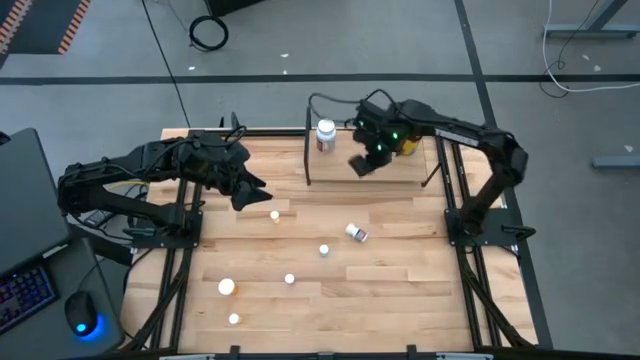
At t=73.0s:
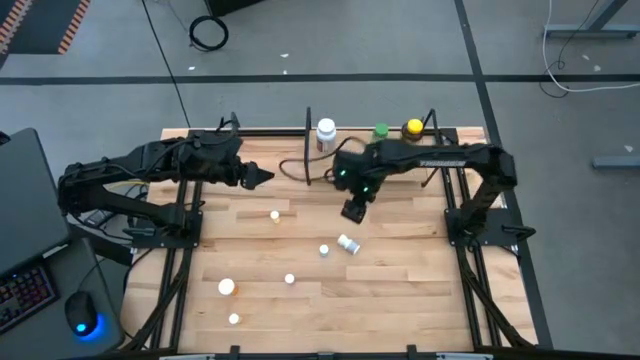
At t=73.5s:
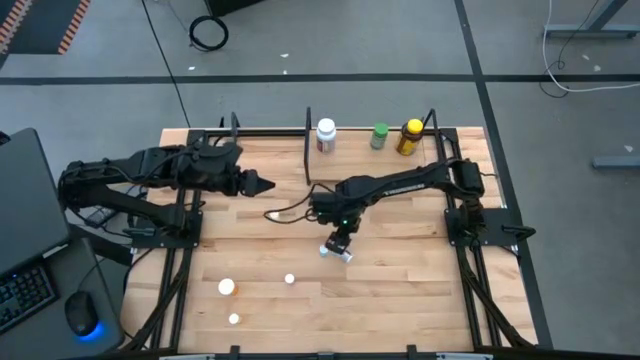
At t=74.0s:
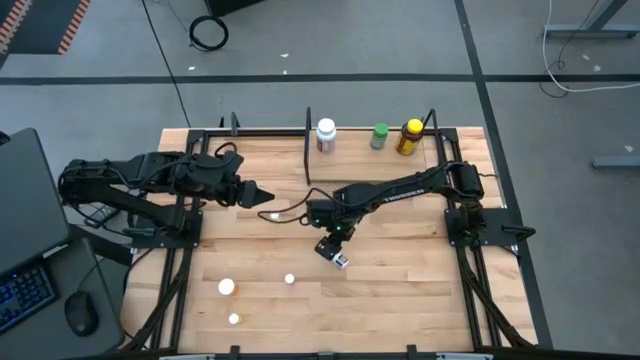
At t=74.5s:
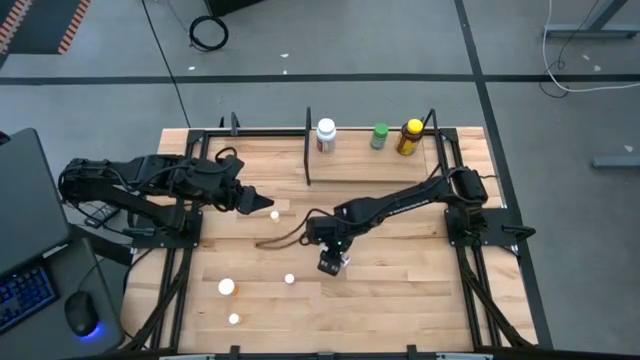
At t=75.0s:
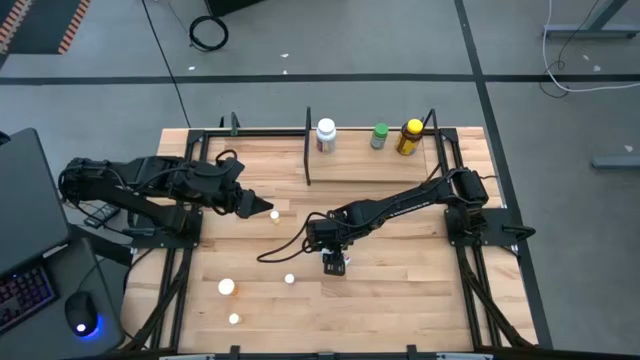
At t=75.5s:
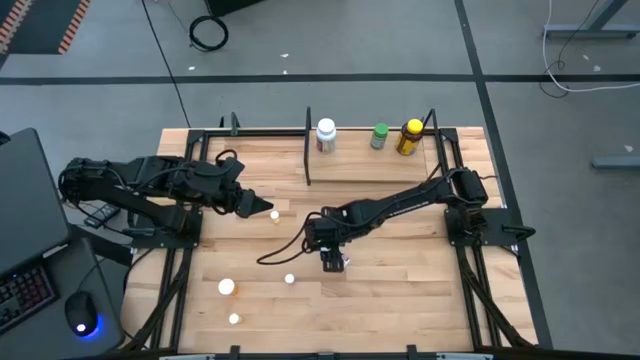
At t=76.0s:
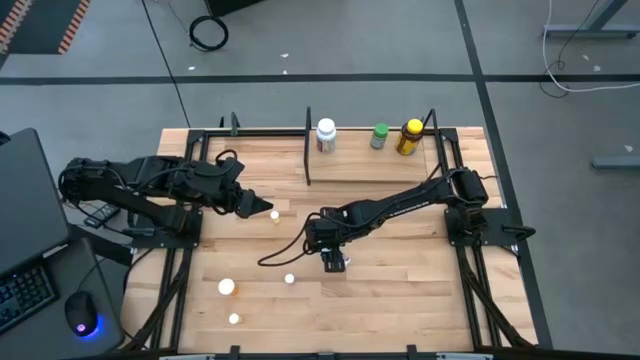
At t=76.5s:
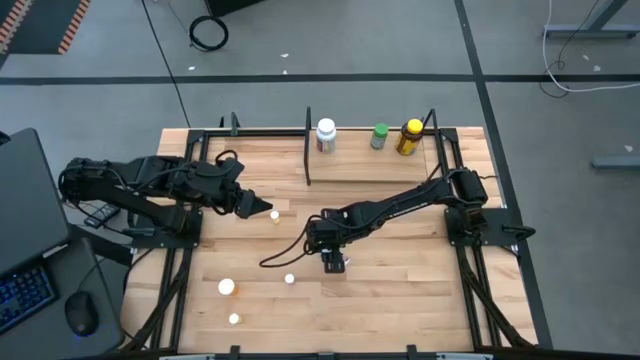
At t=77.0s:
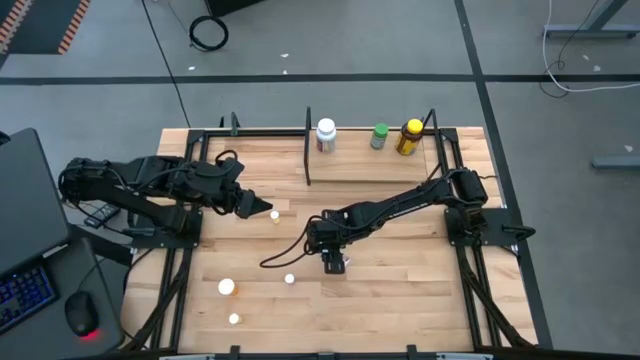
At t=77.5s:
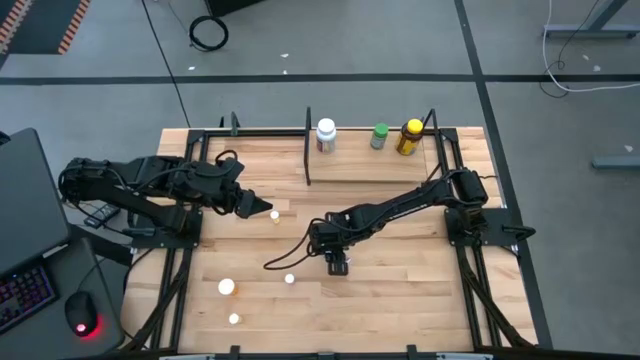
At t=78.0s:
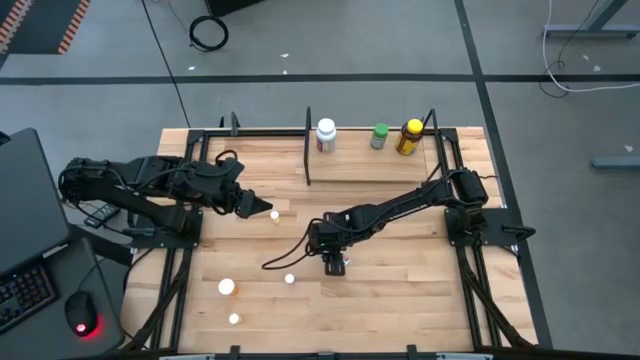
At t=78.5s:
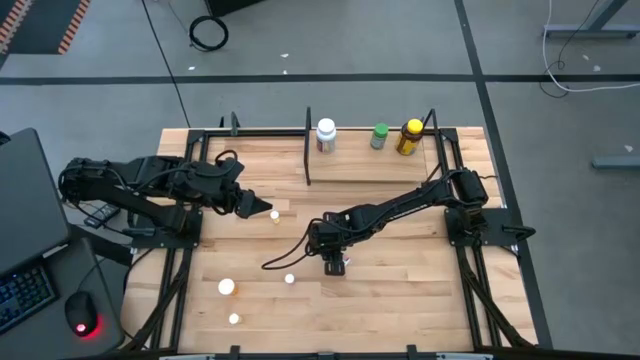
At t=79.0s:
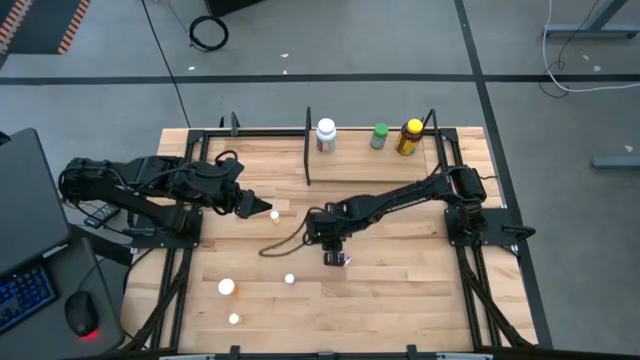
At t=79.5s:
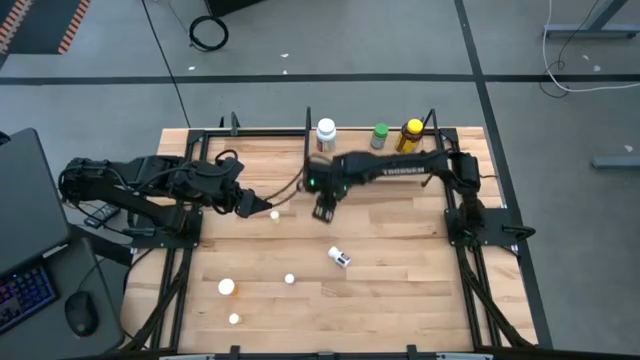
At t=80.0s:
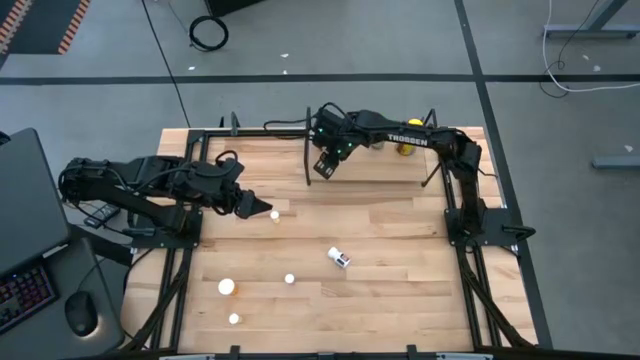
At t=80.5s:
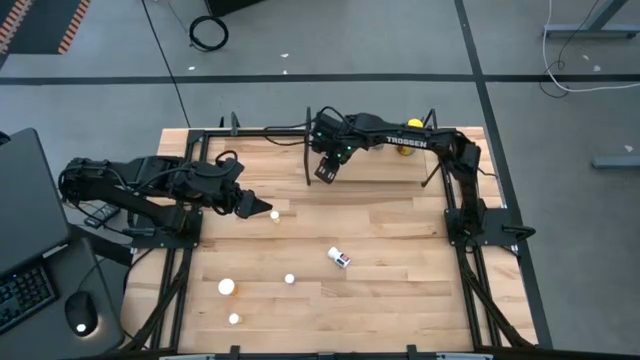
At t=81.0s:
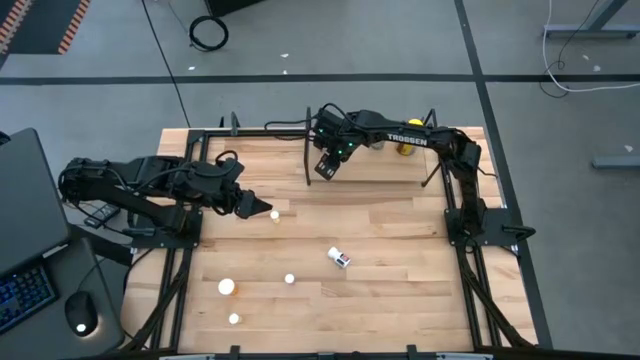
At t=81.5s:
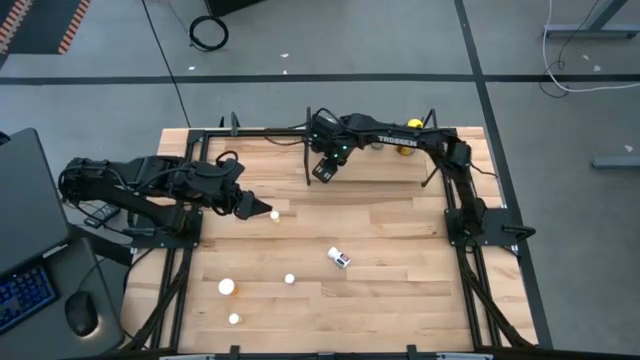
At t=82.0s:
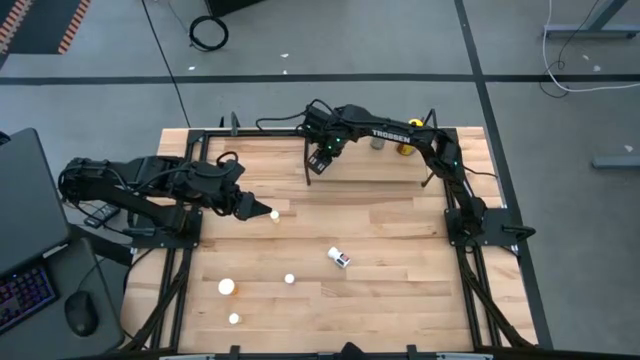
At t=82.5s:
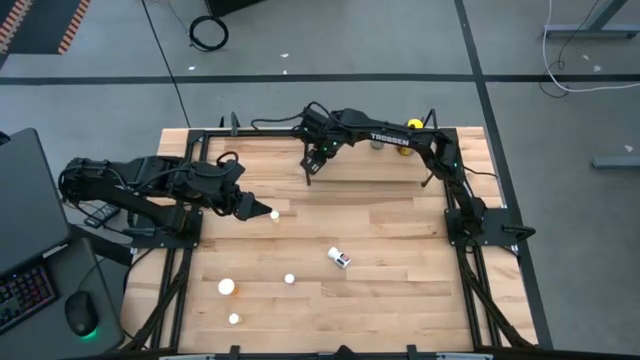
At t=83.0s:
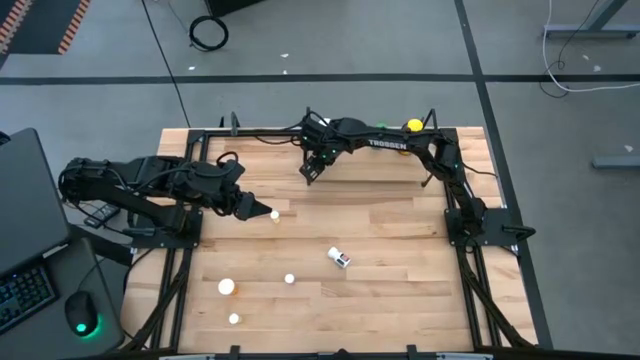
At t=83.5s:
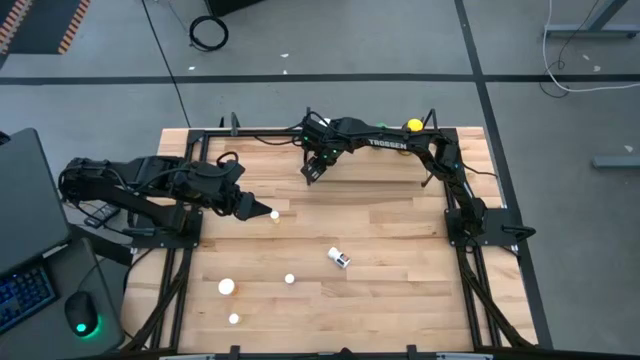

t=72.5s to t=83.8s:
Task: Pick and place medicine bottles onto shelf by color
Put the blue pill bottle on the shelf

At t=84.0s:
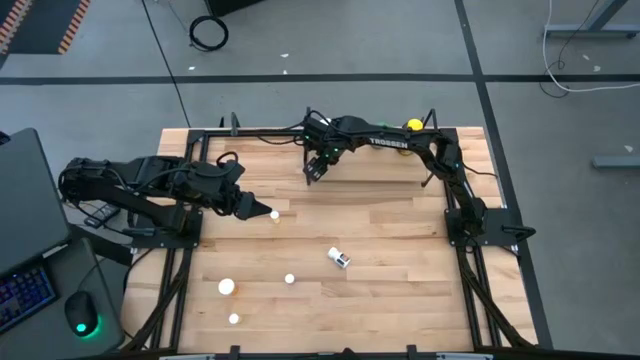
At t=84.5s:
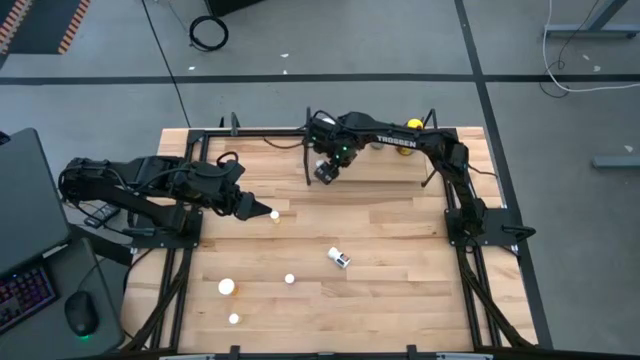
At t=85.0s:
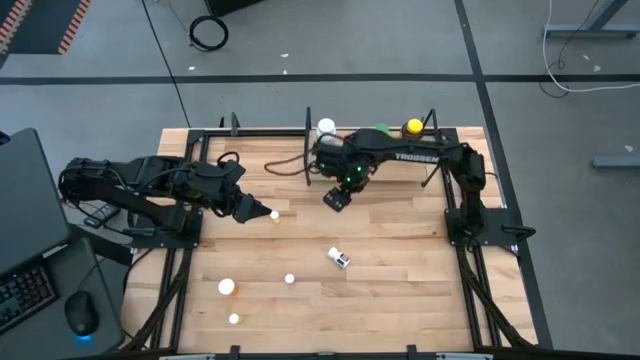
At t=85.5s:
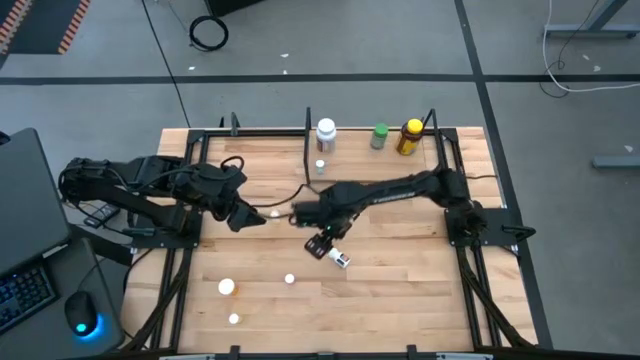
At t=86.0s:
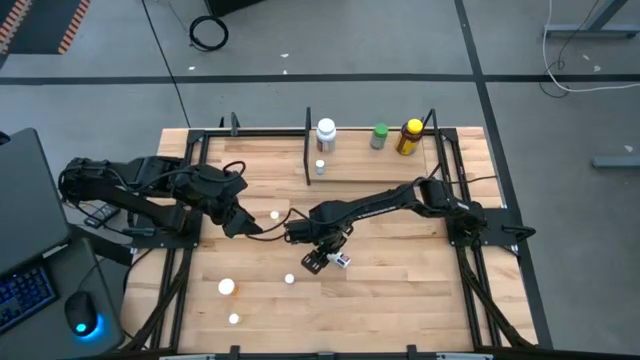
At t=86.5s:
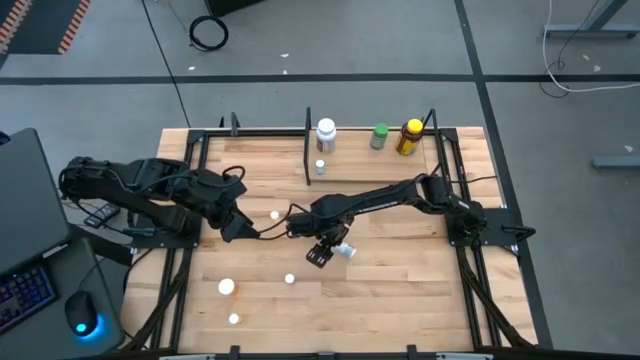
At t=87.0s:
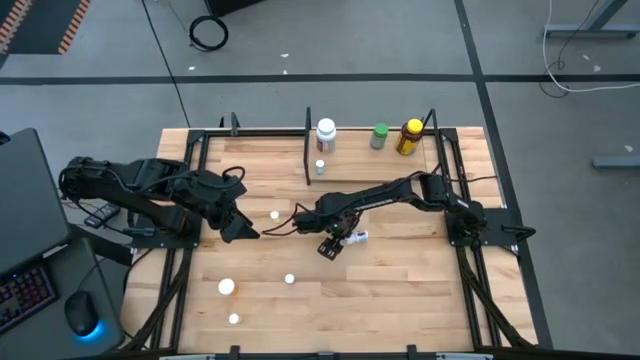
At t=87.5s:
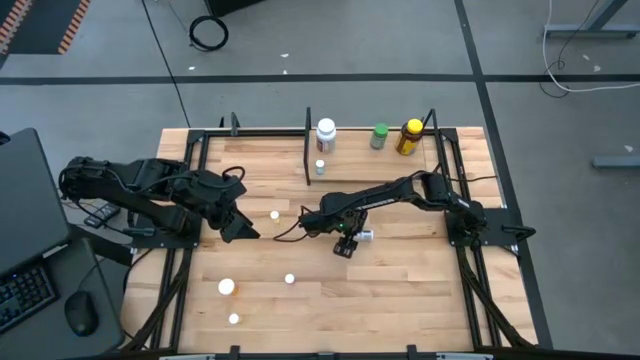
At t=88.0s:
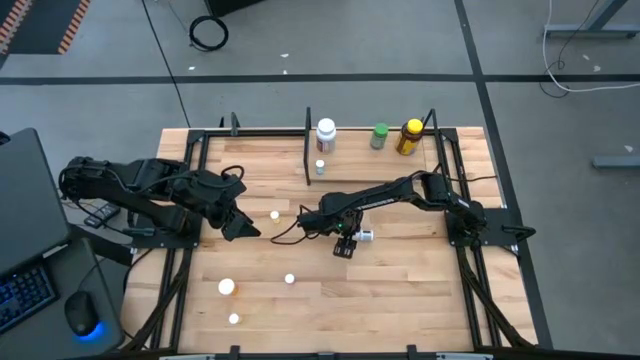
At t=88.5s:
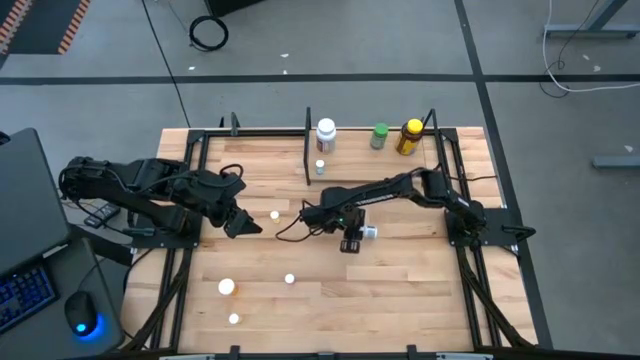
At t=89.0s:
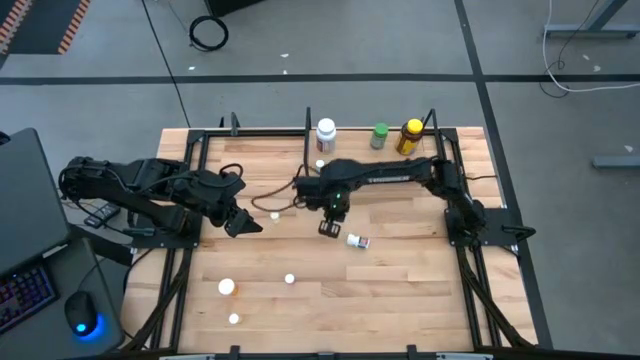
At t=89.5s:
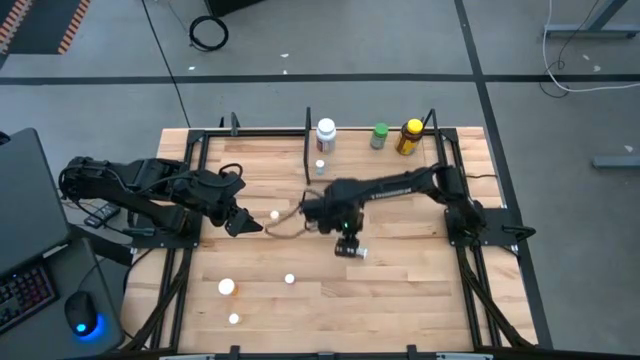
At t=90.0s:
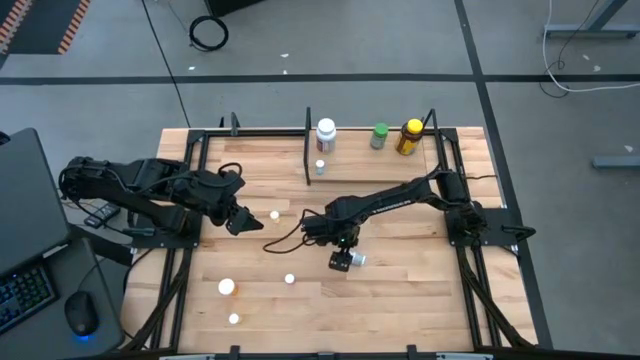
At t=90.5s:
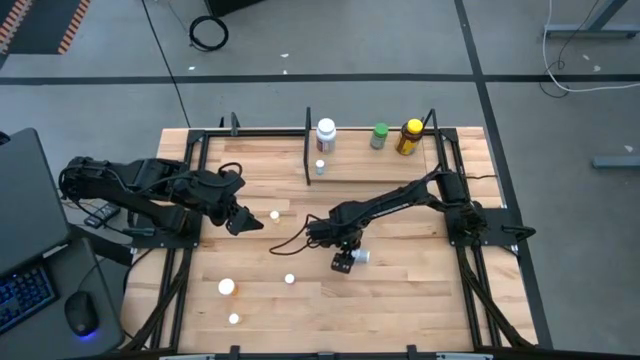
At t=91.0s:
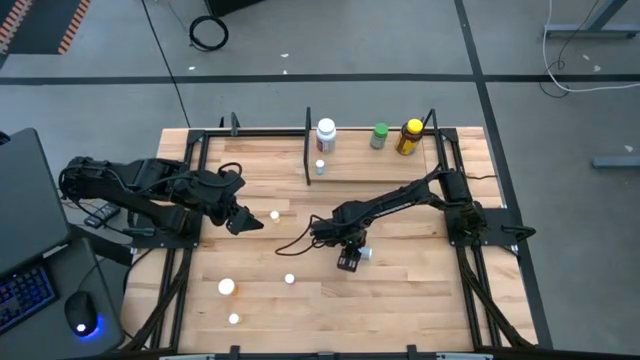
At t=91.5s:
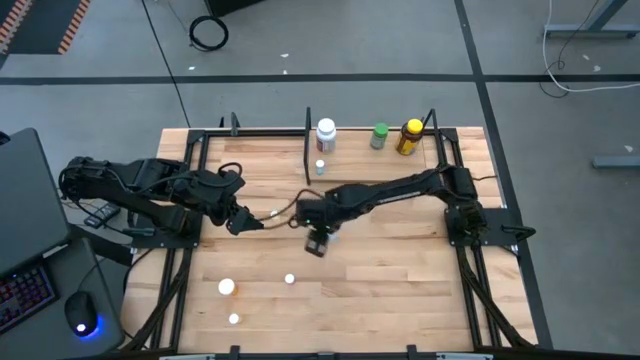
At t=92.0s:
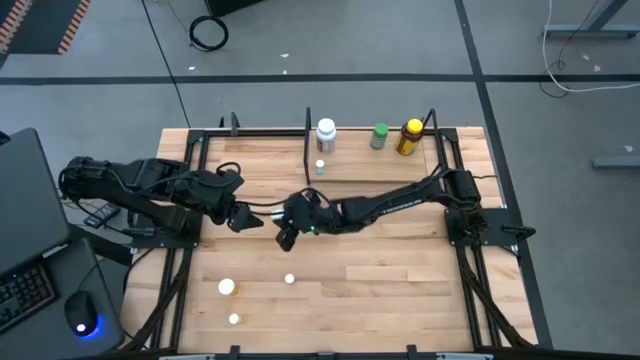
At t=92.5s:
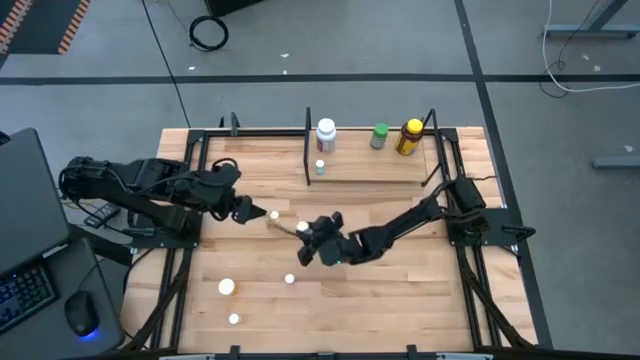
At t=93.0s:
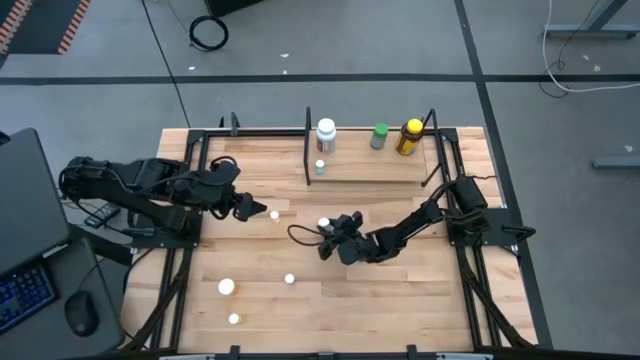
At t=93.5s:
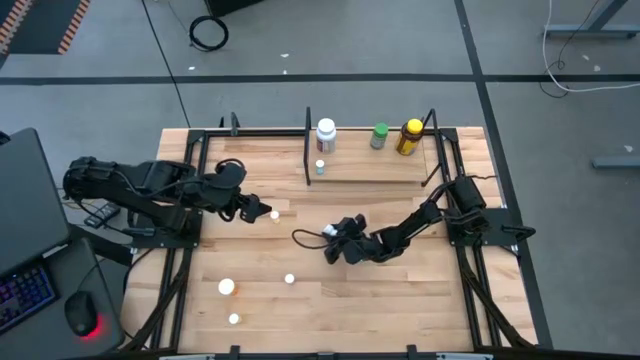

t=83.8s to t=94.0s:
Put the small white bottle pill bottle on the shelf
